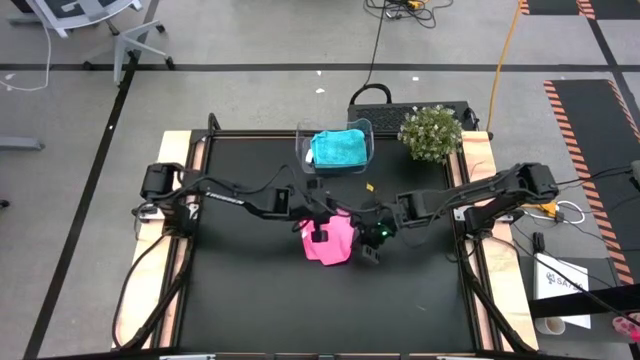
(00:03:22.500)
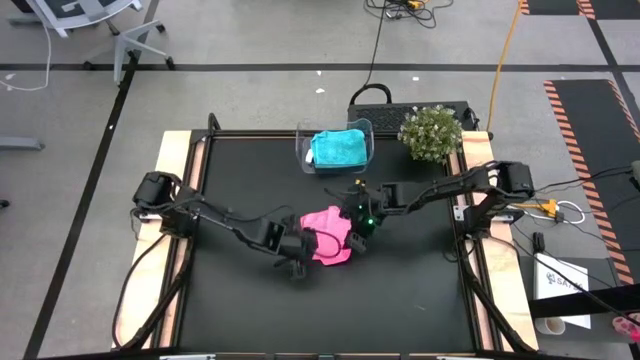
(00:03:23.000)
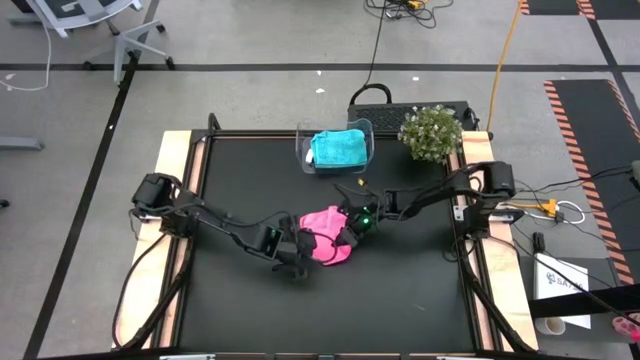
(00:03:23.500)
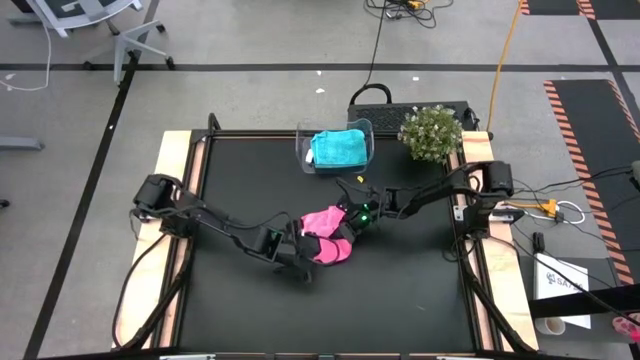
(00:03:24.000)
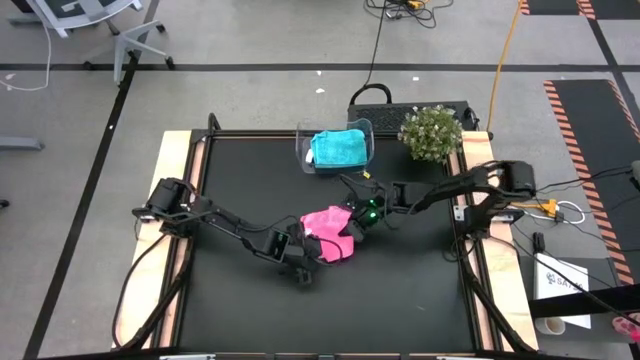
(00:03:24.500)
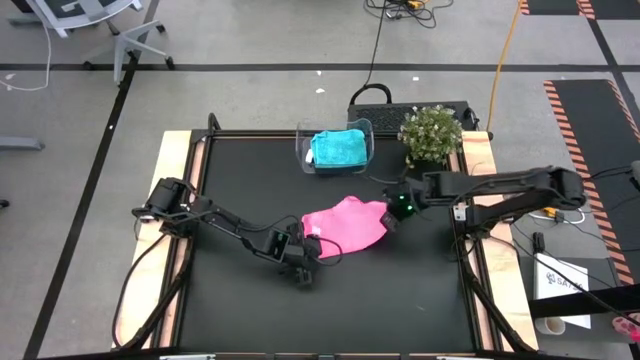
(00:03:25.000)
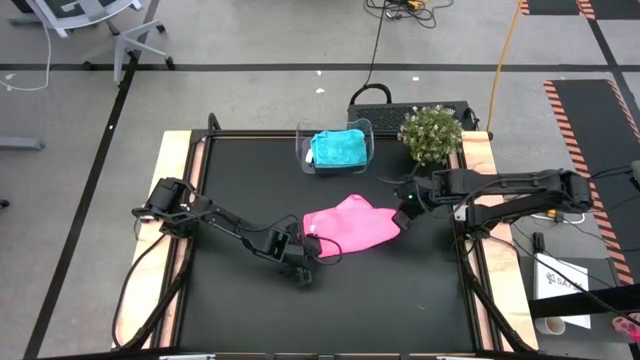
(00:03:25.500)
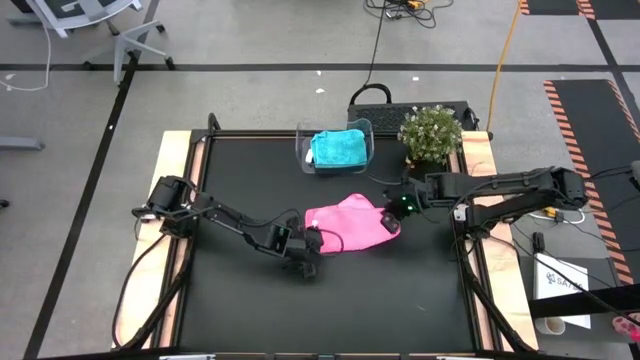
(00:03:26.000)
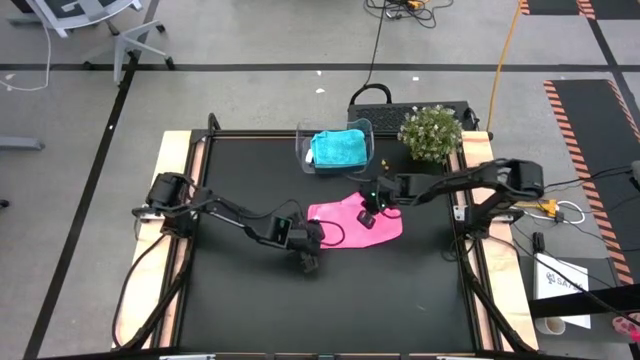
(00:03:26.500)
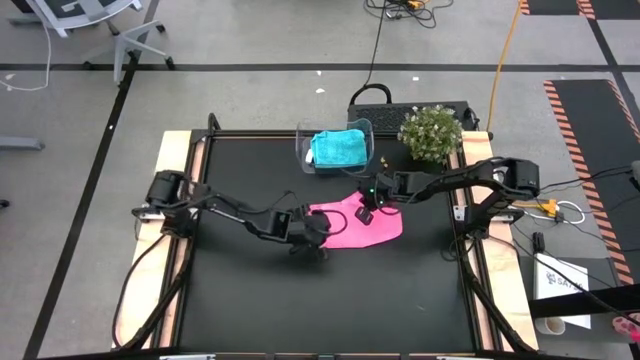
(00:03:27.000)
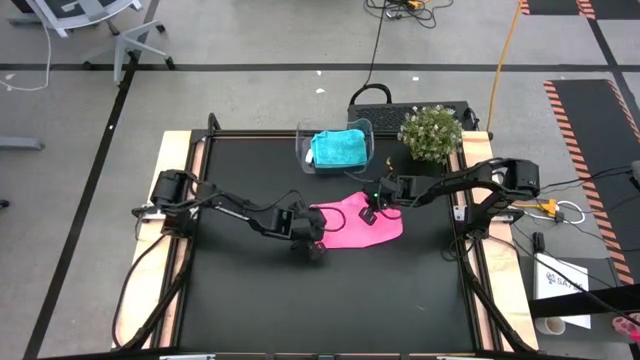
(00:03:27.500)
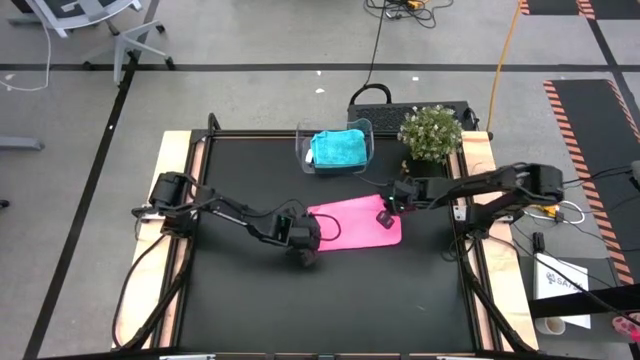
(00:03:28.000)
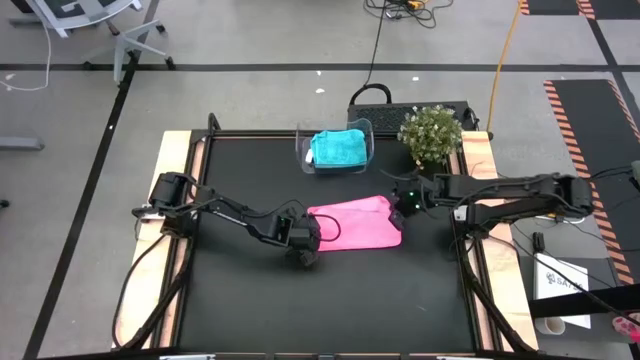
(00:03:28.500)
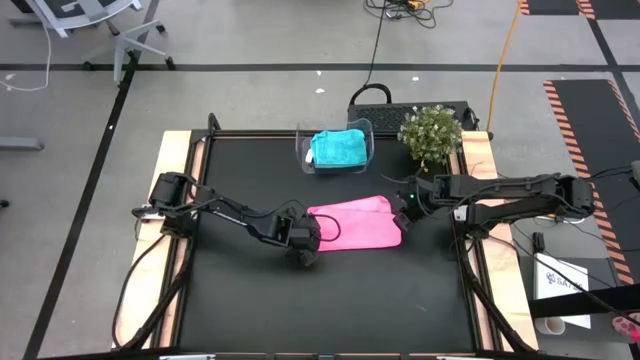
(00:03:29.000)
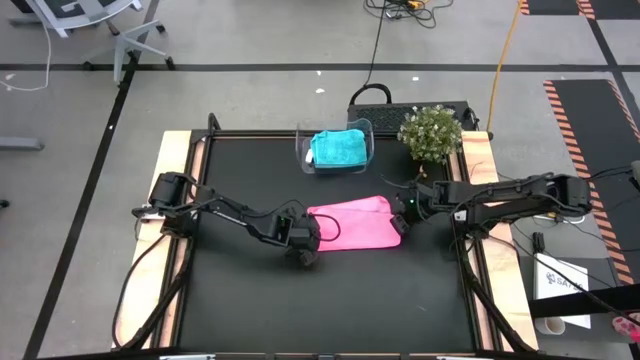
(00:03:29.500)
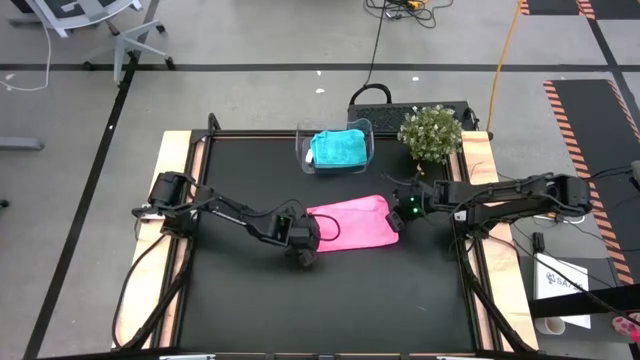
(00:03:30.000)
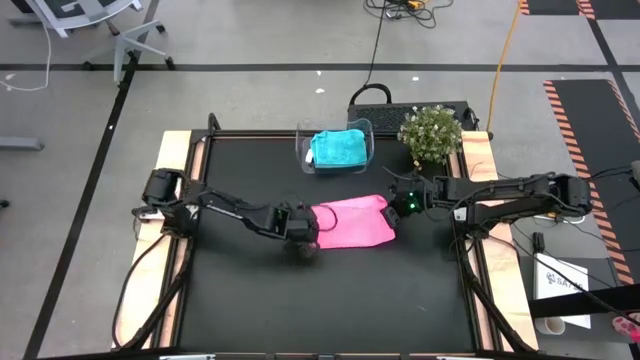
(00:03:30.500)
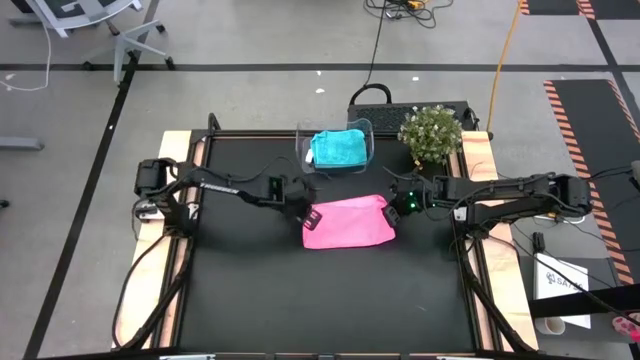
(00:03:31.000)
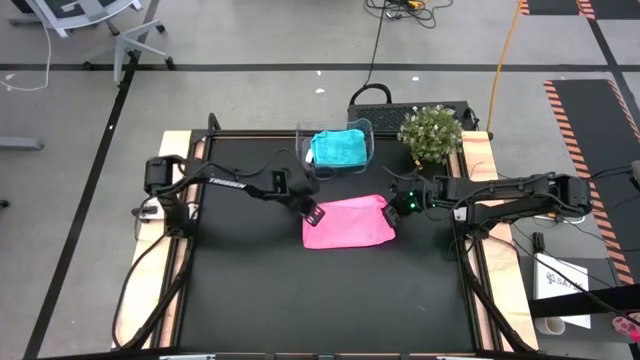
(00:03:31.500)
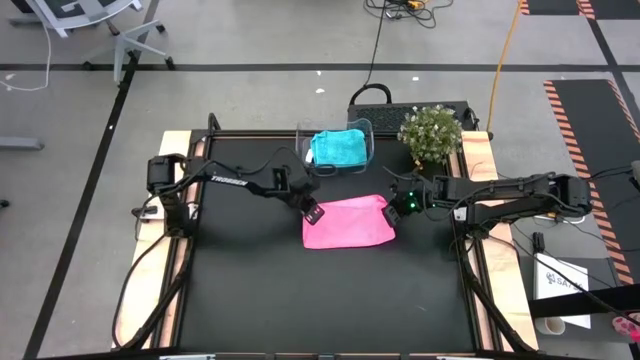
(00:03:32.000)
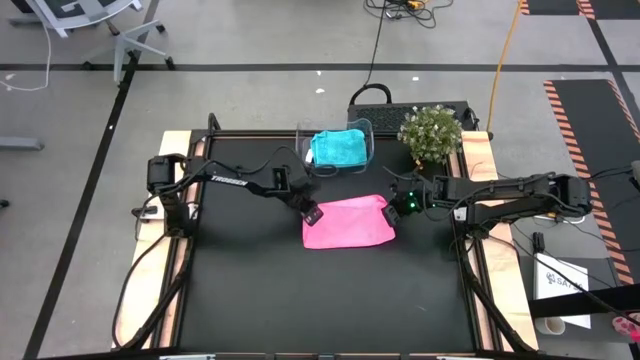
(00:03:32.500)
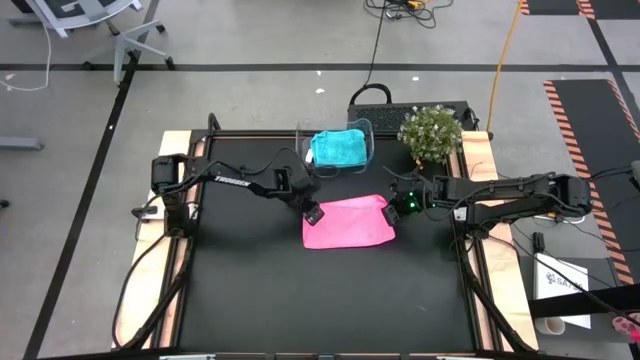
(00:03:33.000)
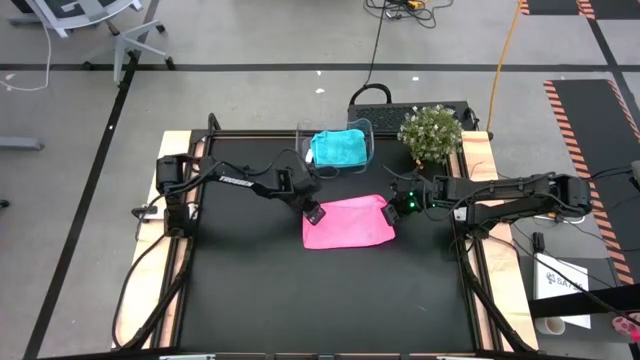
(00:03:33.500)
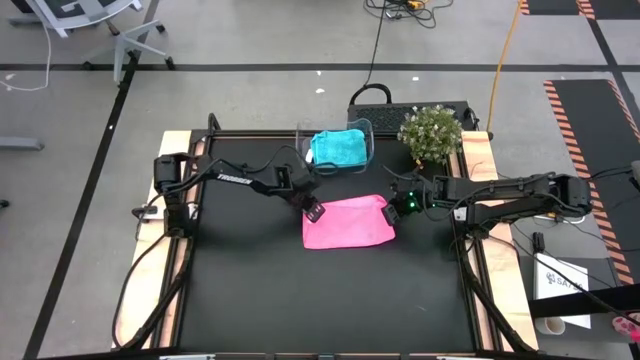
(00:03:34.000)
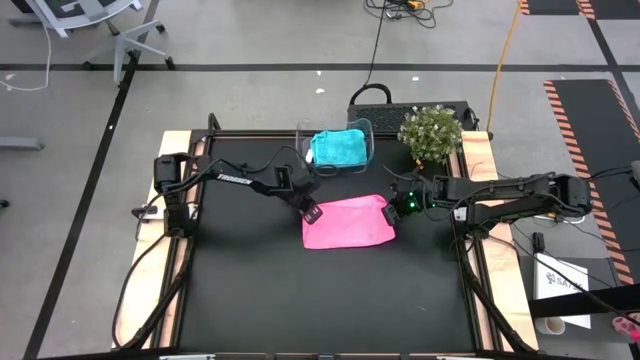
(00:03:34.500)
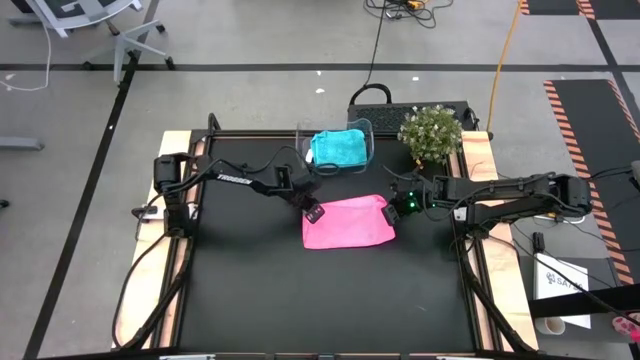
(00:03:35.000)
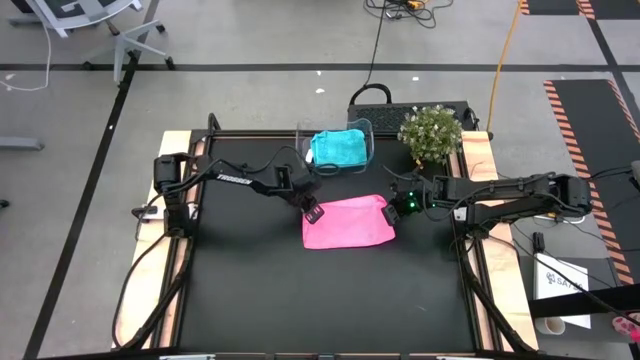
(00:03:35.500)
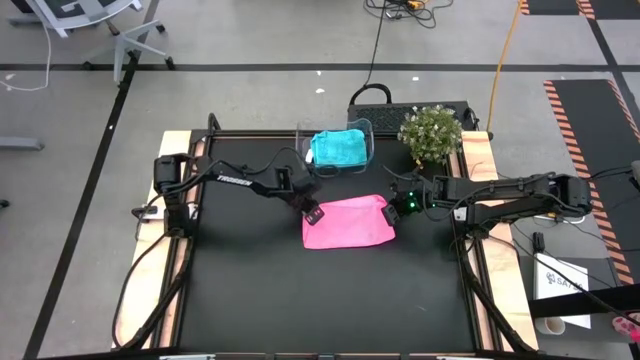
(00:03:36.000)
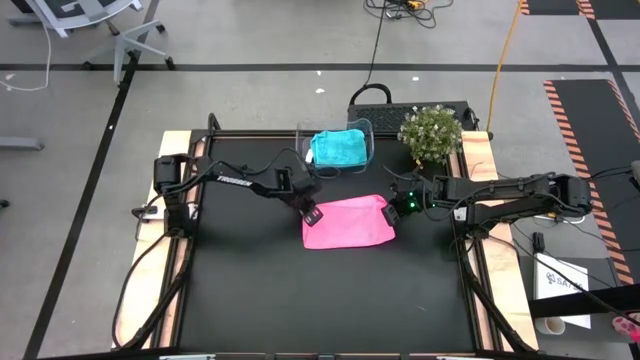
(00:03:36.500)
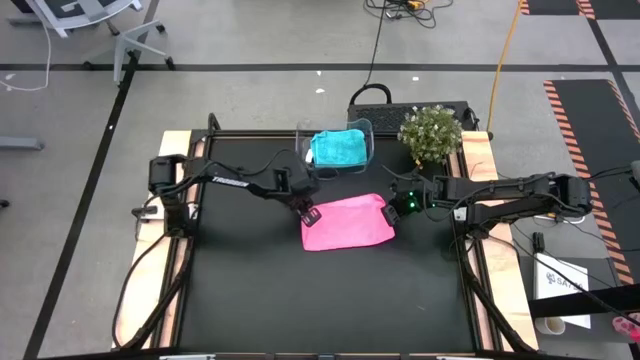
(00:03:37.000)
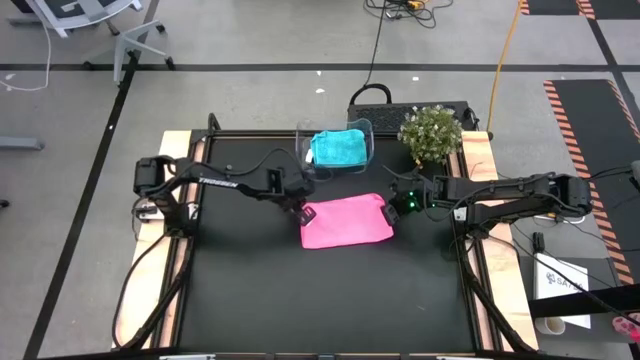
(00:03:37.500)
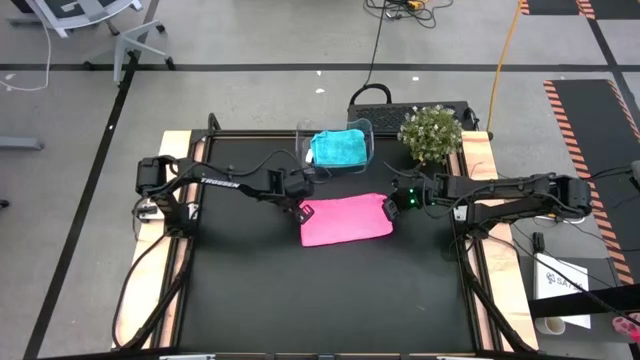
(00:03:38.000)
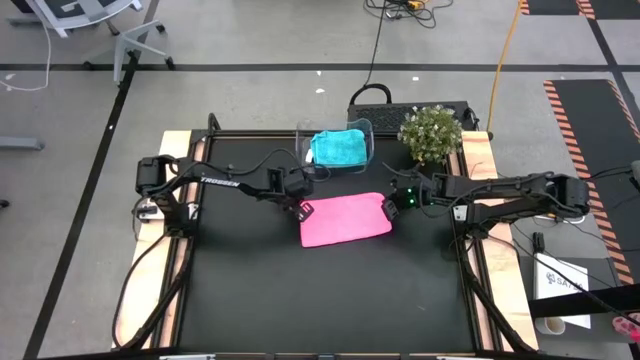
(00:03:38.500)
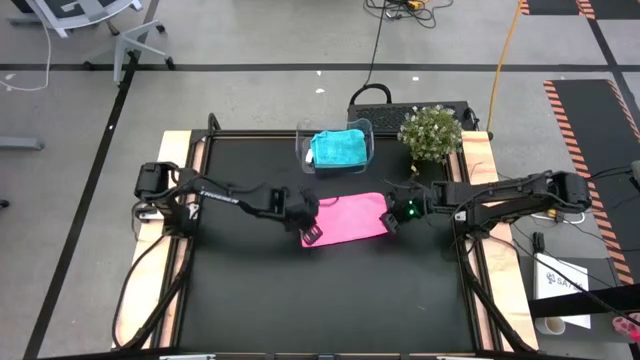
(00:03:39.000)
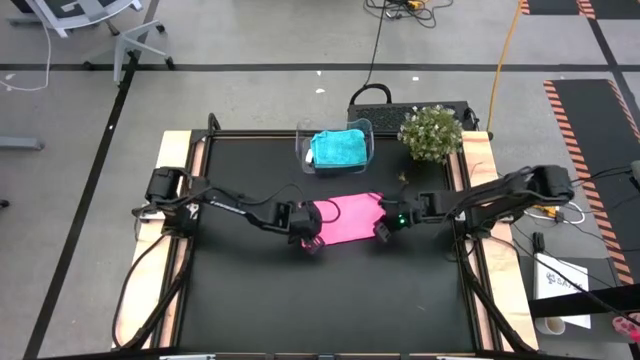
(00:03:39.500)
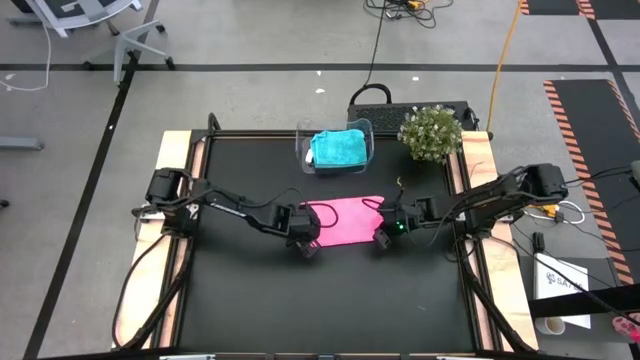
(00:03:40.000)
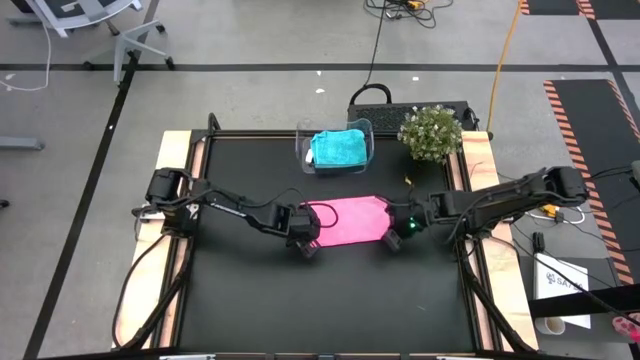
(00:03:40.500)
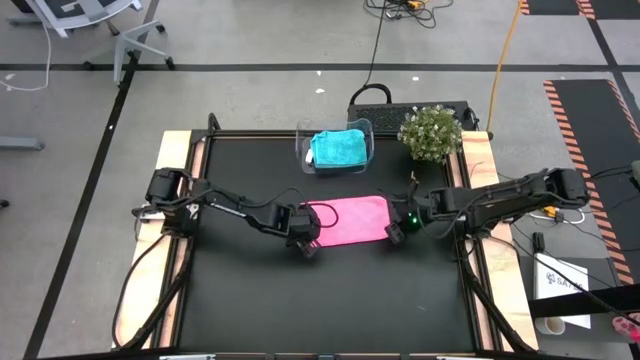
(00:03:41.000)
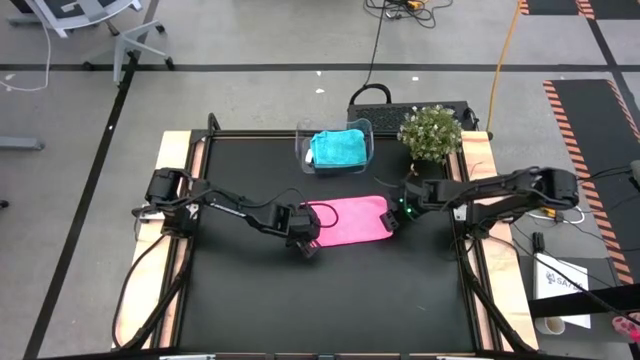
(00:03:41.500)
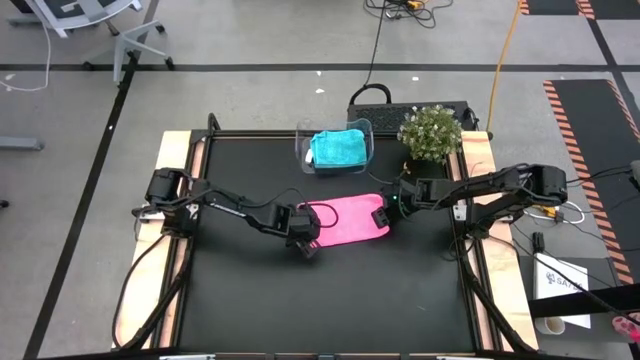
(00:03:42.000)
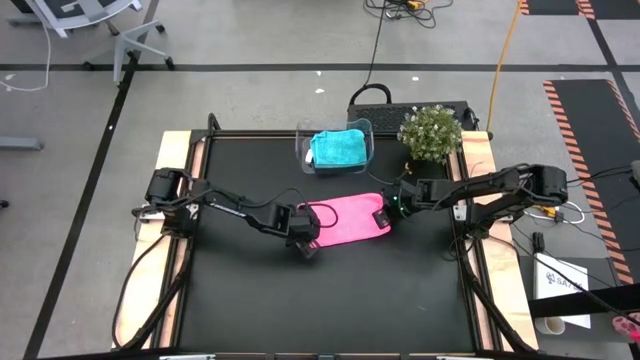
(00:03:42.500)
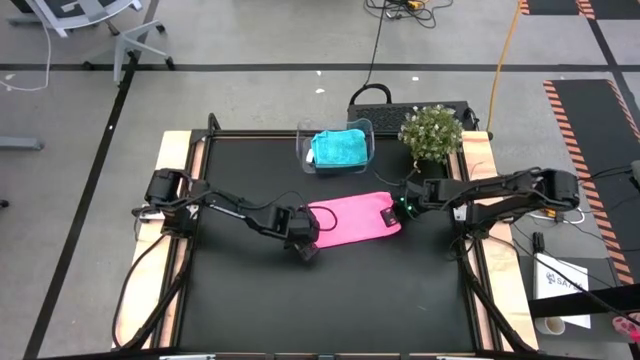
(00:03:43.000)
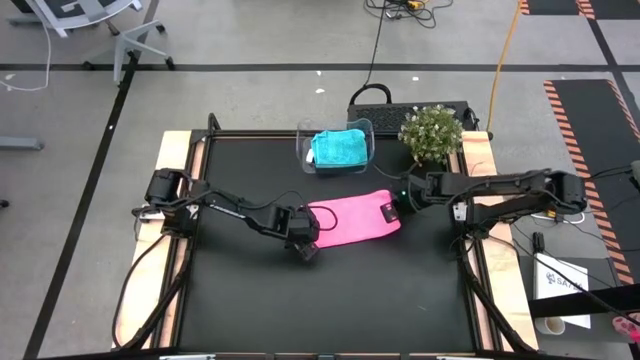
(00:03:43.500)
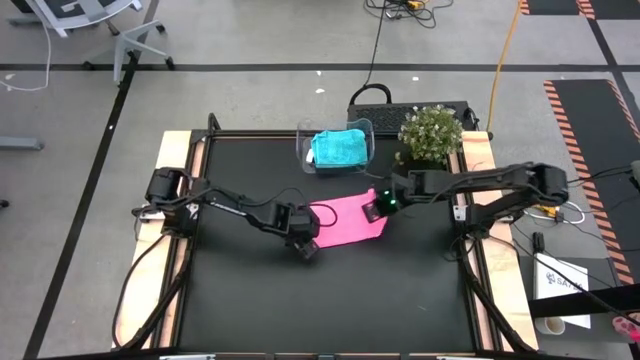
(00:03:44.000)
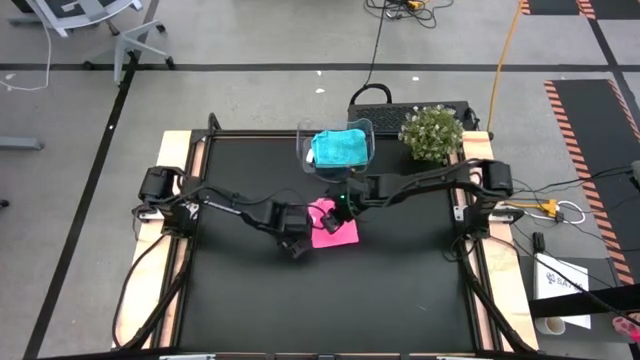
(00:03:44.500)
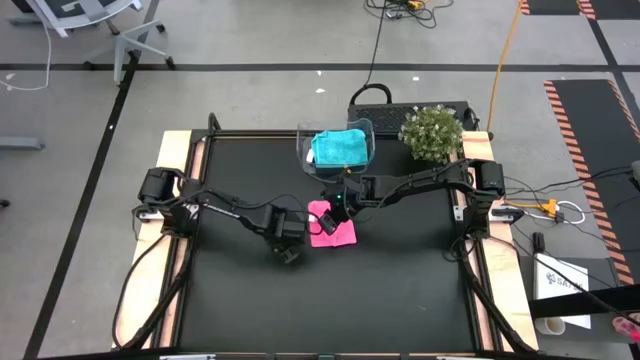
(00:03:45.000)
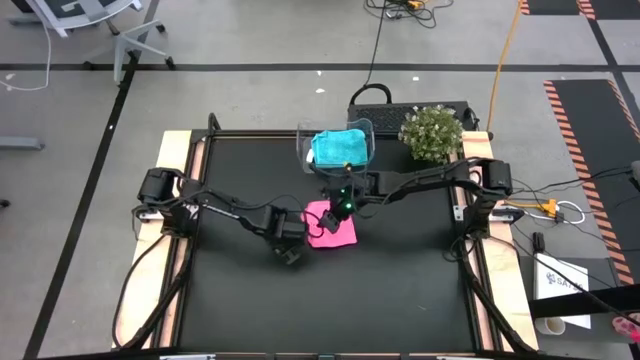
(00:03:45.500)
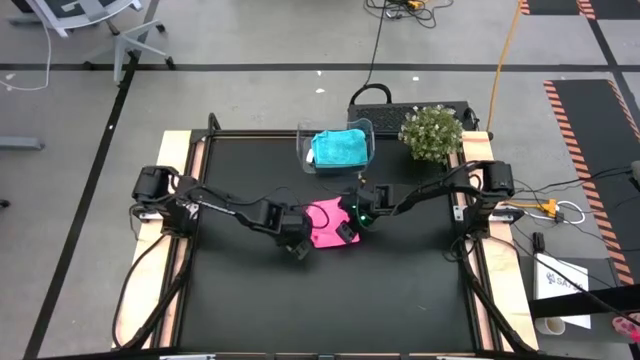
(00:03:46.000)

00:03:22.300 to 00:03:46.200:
Task: Fold microfiber towels
Fold the pink microfiber cloth
